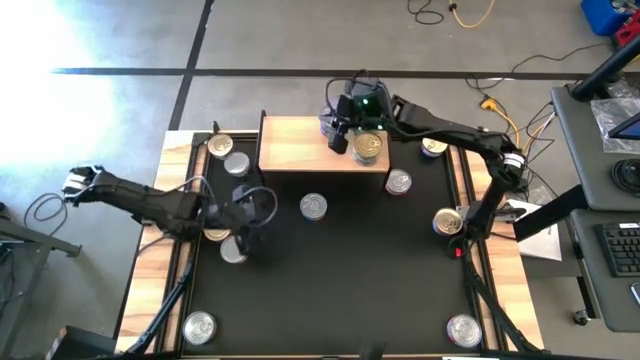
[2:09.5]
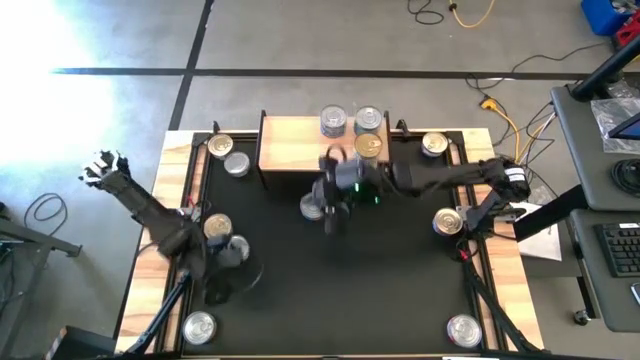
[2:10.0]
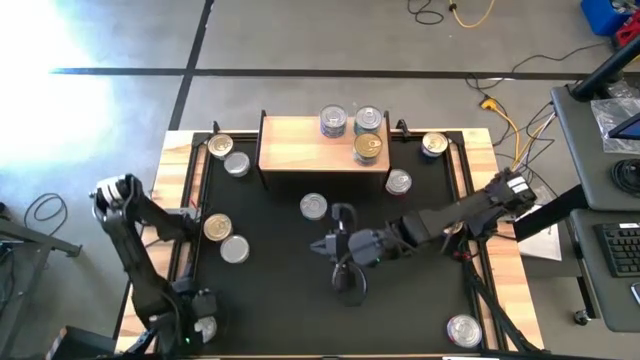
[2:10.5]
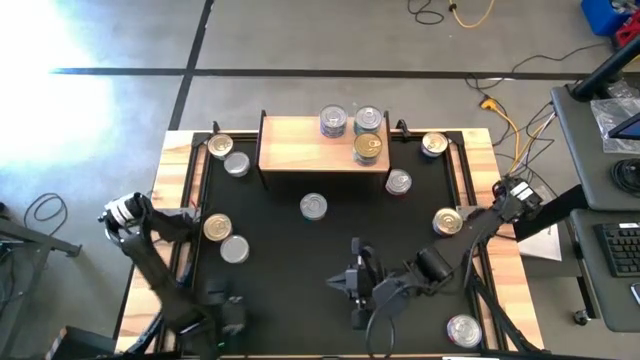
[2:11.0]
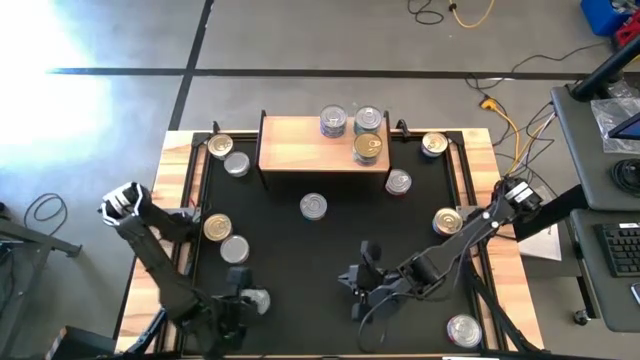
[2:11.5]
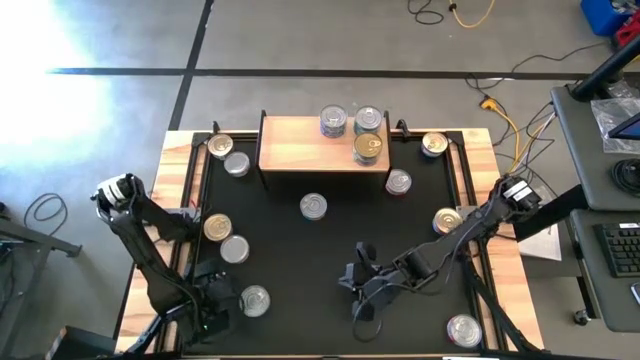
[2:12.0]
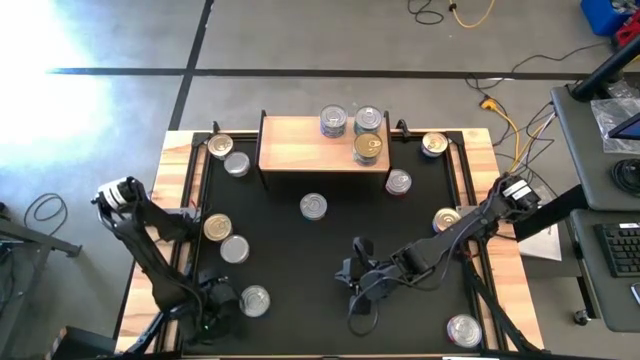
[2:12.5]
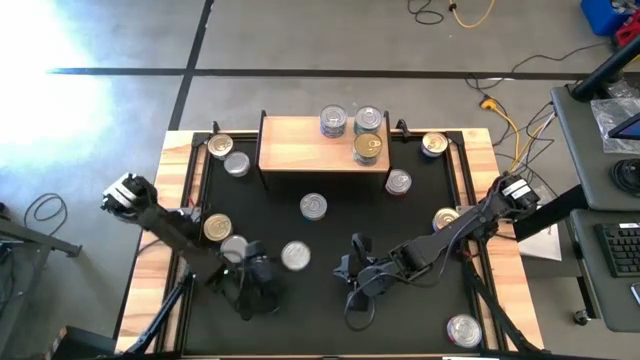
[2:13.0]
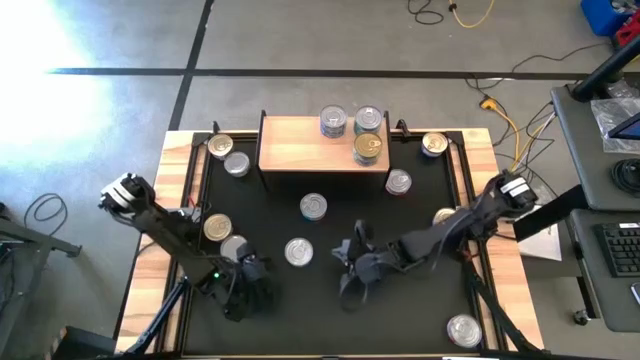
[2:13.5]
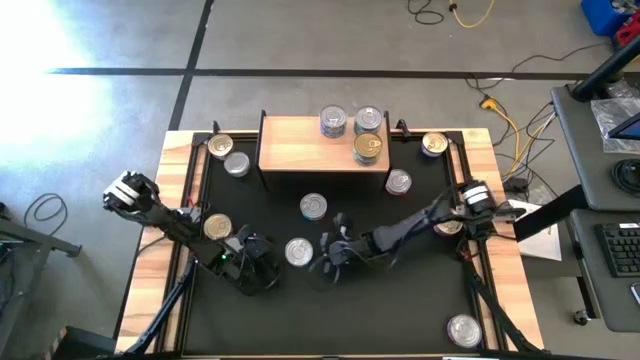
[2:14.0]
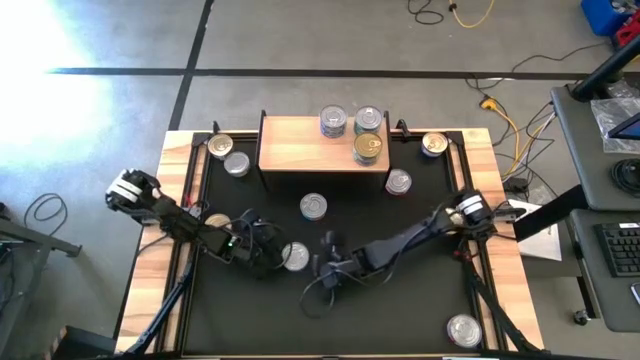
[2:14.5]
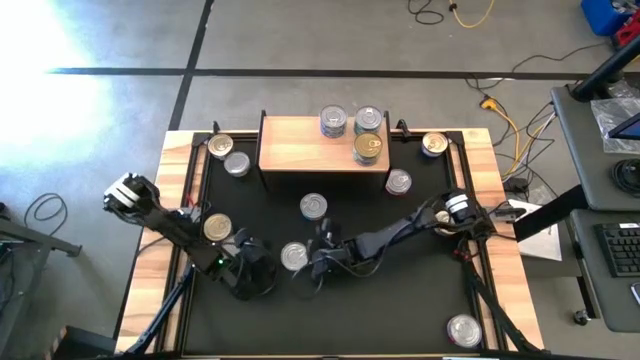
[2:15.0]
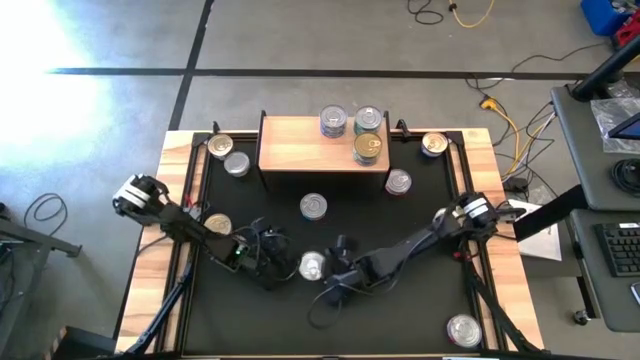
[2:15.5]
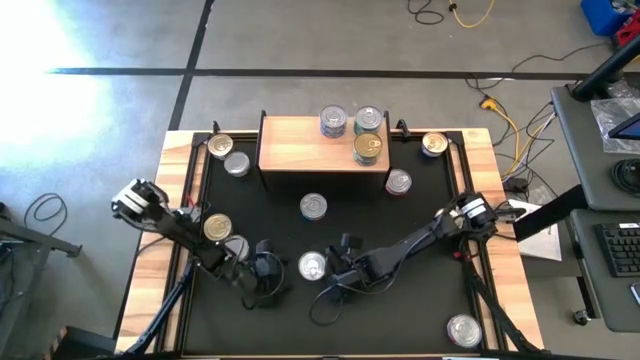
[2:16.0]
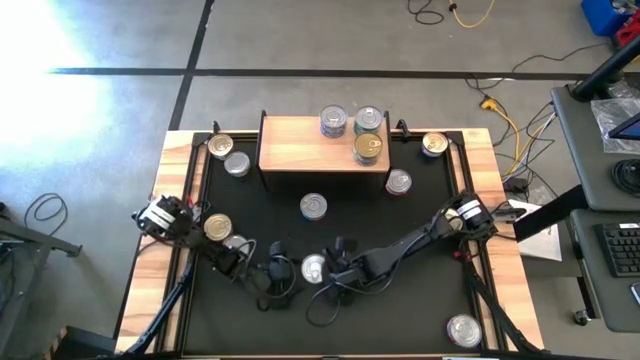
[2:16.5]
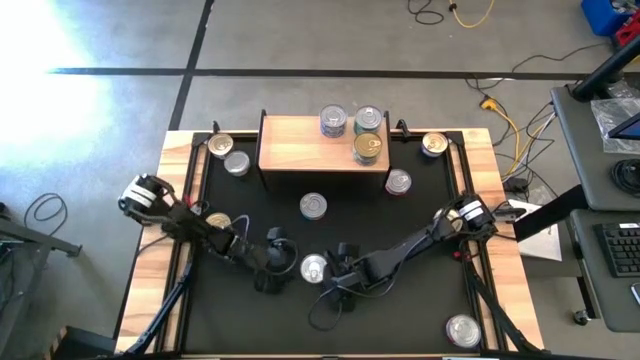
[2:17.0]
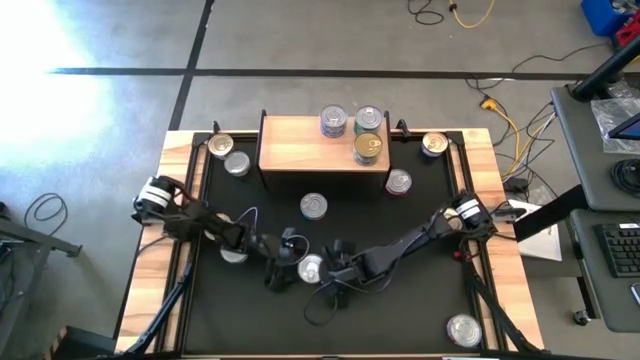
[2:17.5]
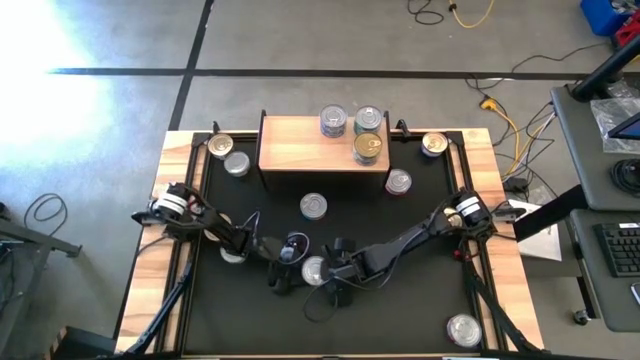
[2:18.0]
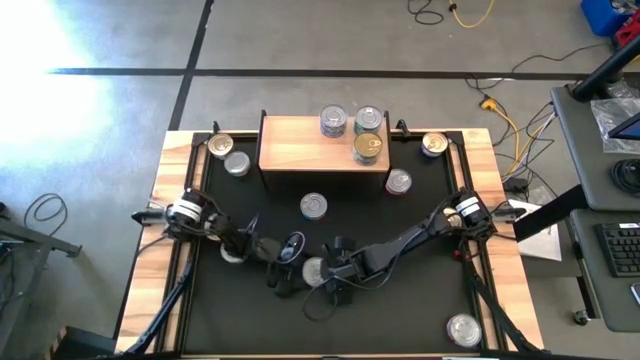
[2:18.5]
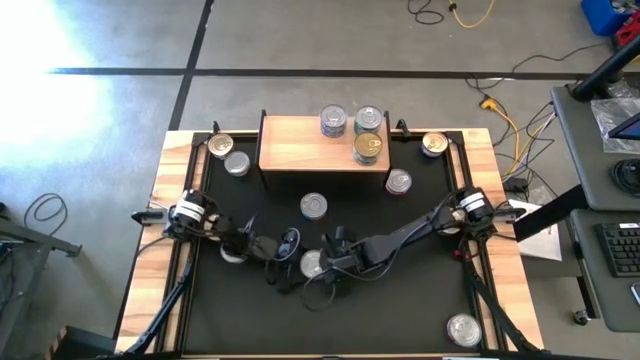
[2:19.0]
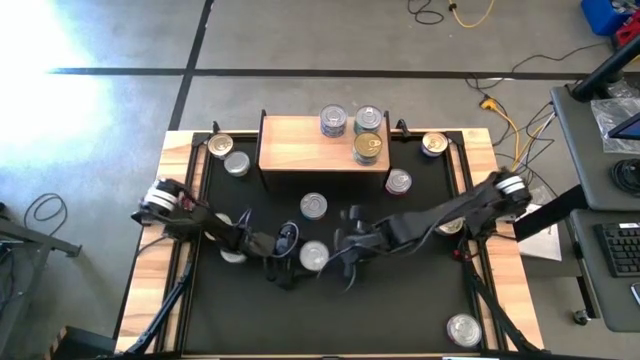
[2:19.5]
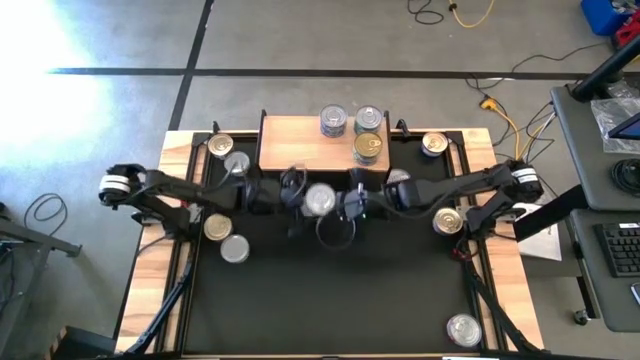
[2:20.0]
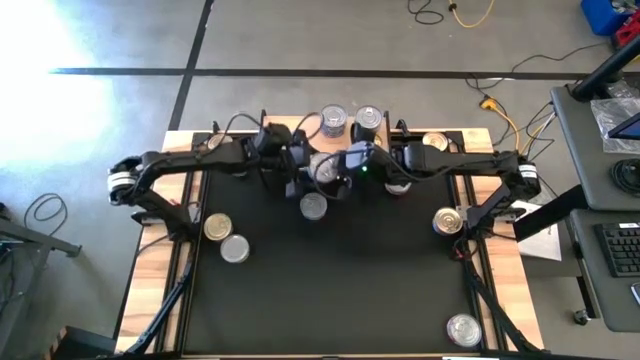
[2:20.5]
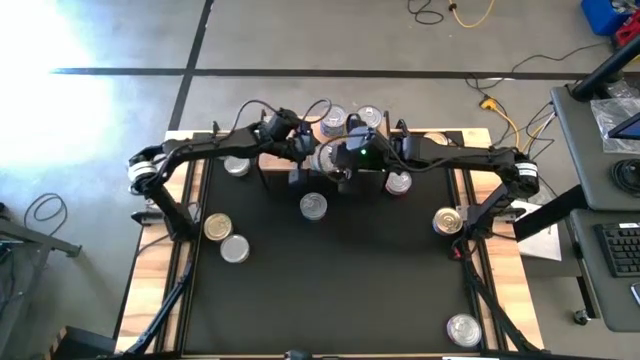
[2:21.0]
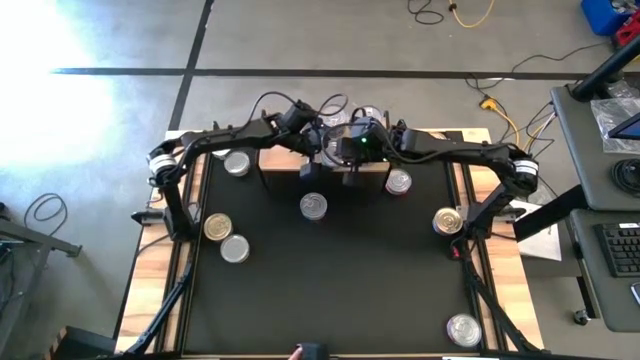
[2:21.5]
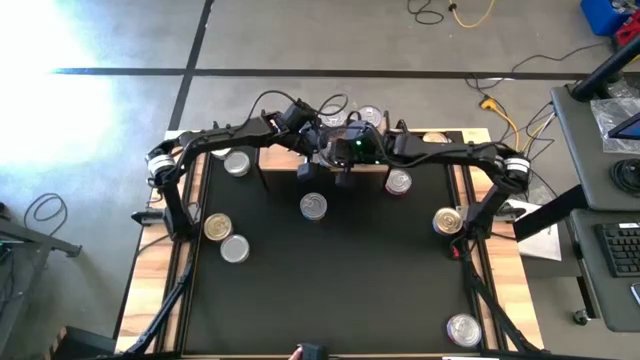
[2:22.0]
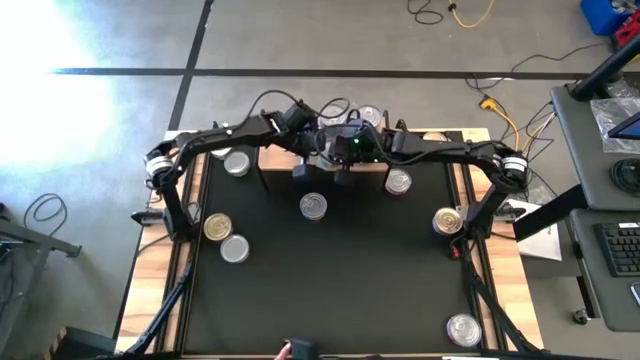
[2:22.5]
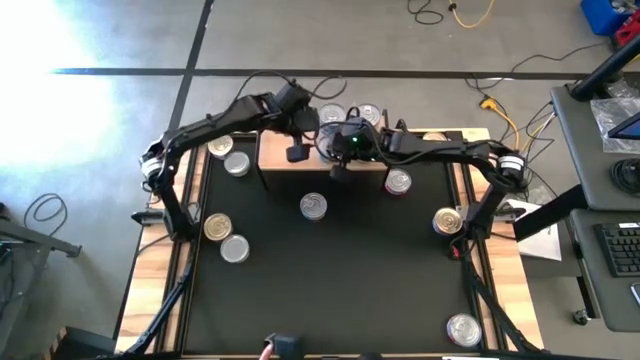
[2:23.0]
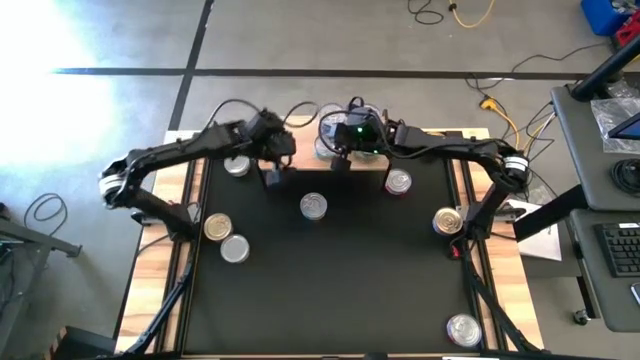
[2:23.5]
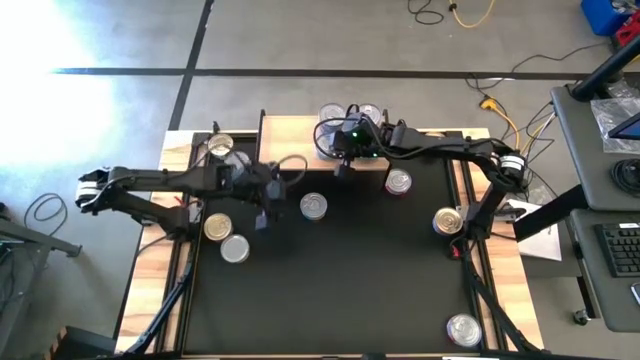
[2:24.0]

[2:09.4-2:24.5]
Task: Stack canned seafood by type on shelf
Put the bottom blue yellow tuna can on the shelf

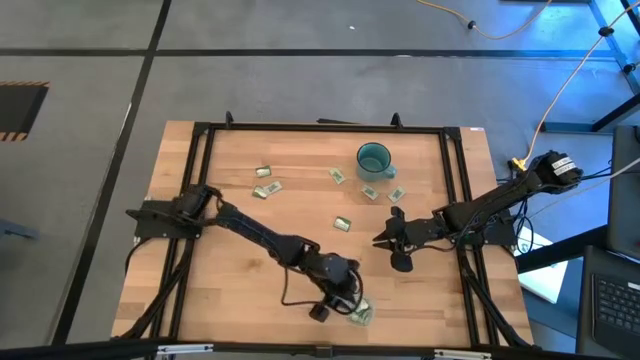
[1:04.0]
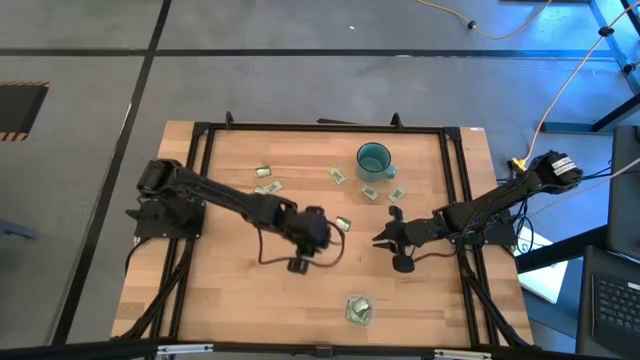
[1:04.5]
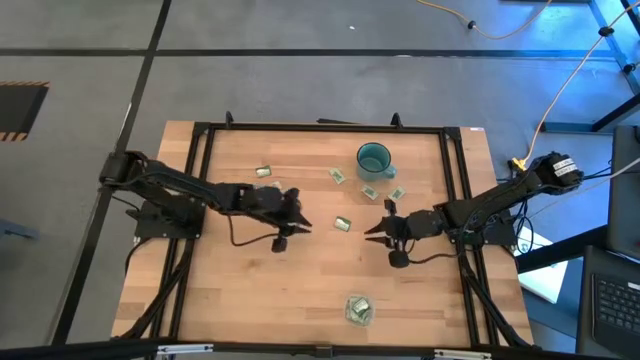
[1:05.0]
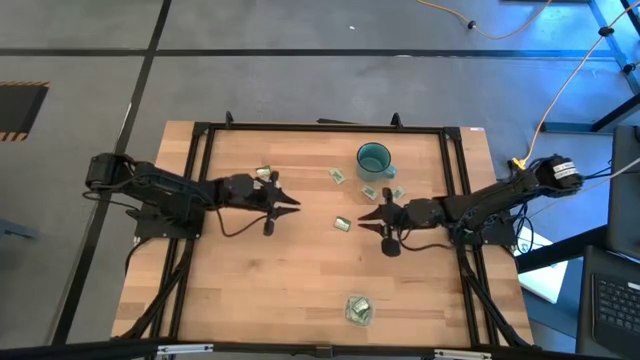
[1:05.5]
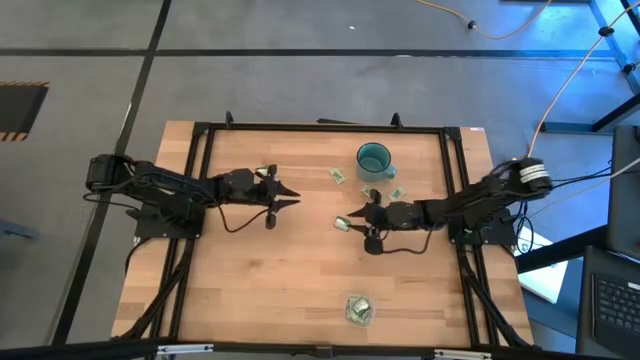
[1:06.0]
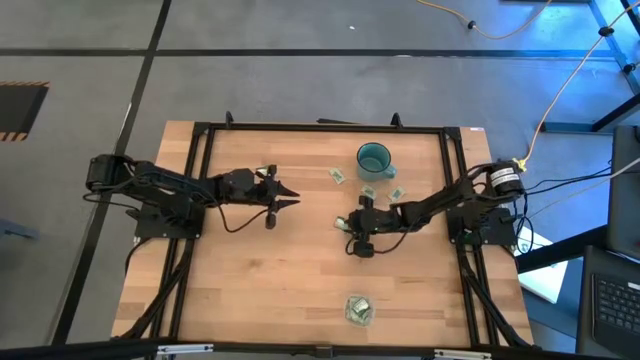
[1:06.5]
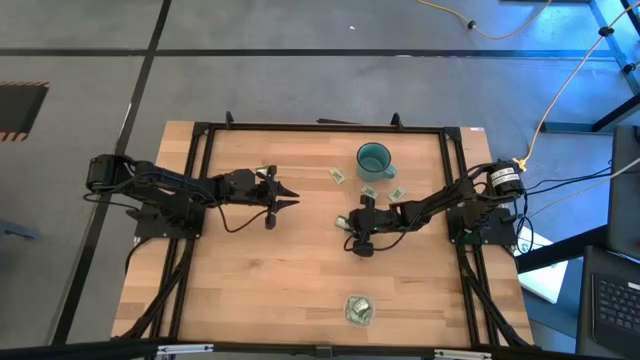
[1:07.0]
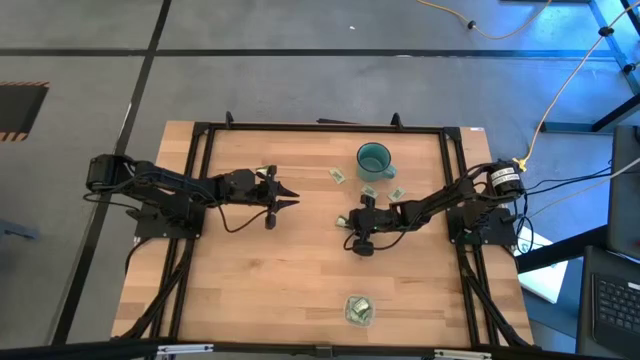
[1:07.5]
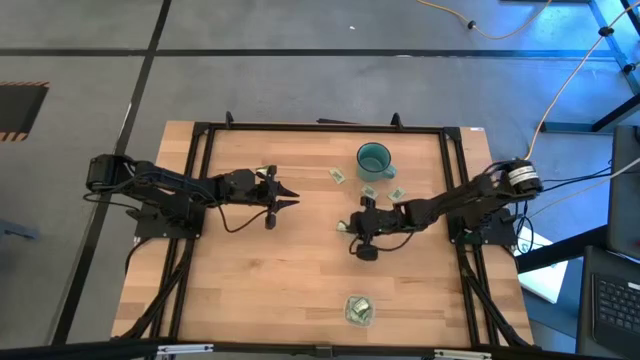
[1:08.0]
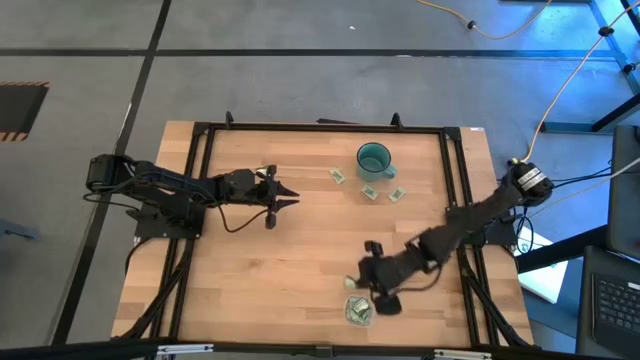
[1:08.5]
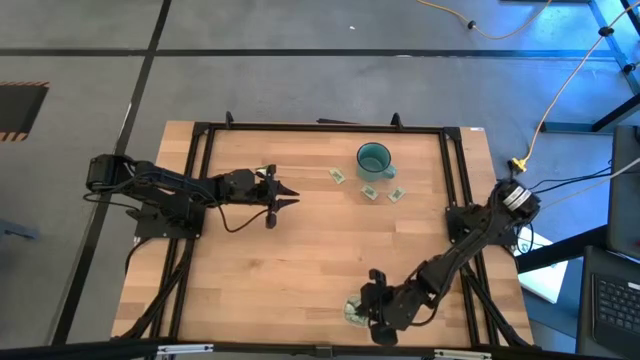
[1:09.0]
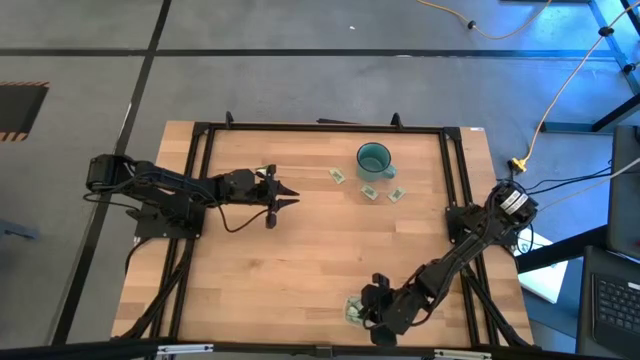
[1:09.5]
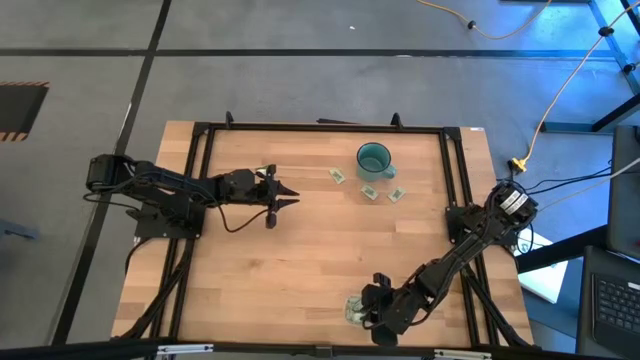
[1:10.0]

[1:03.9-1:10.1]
Task: Pick and place items into bin
Put the green truvia packet into the transparent bin
